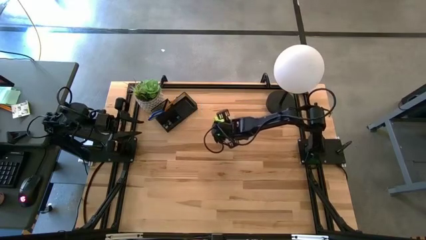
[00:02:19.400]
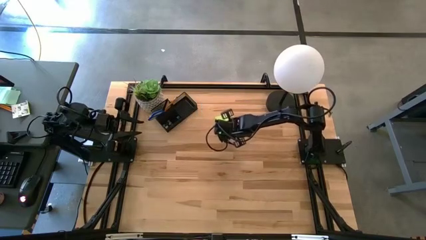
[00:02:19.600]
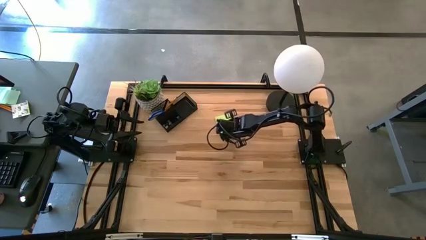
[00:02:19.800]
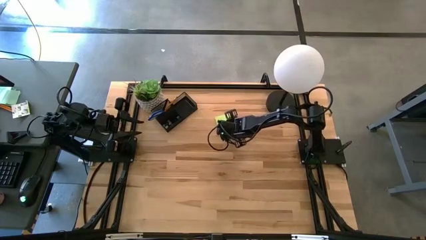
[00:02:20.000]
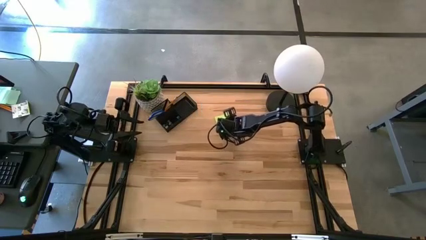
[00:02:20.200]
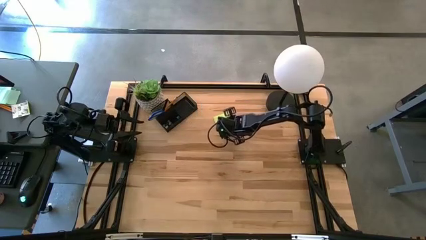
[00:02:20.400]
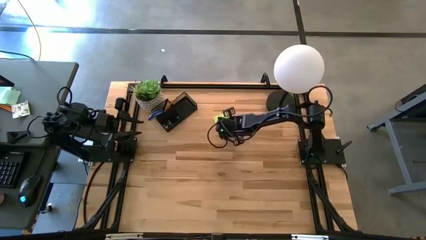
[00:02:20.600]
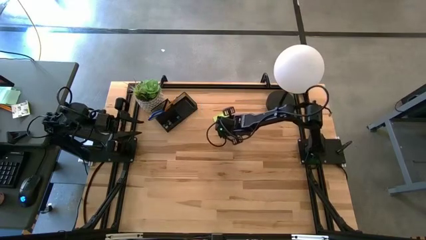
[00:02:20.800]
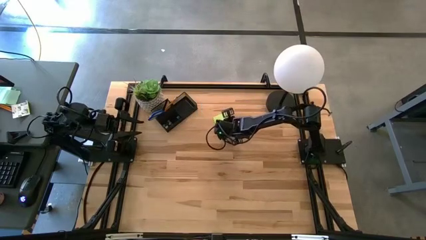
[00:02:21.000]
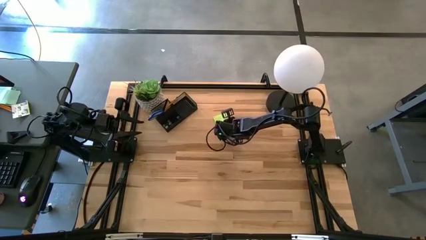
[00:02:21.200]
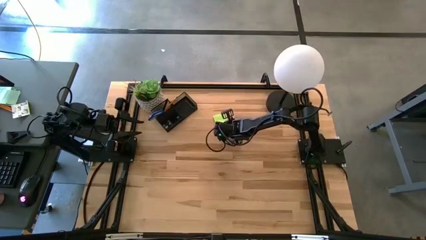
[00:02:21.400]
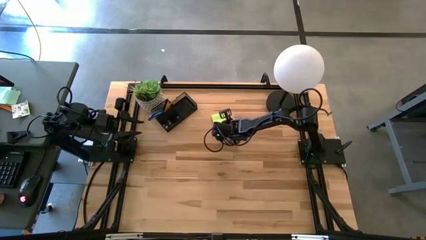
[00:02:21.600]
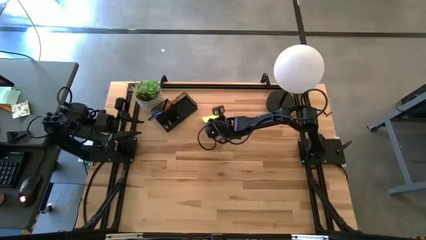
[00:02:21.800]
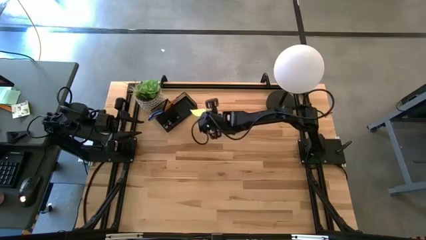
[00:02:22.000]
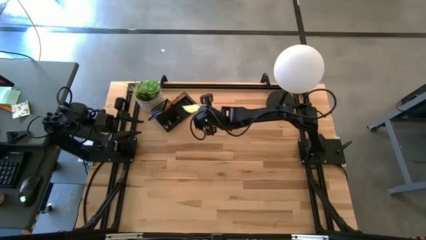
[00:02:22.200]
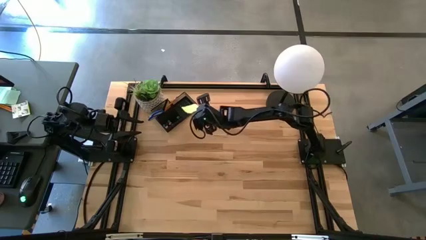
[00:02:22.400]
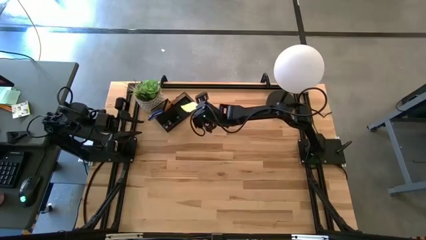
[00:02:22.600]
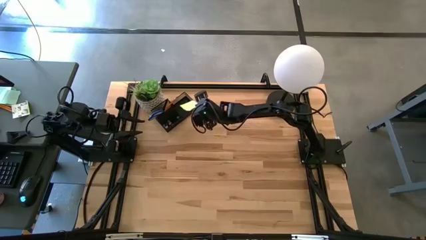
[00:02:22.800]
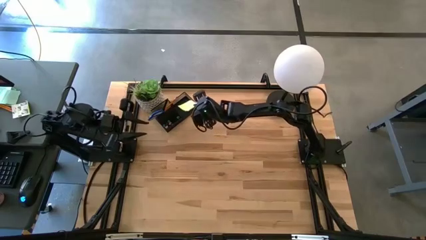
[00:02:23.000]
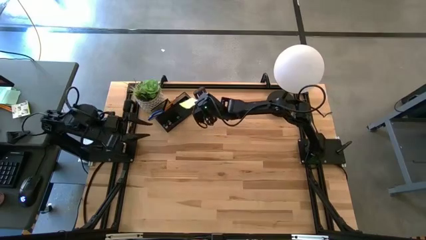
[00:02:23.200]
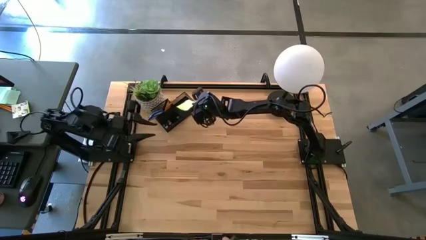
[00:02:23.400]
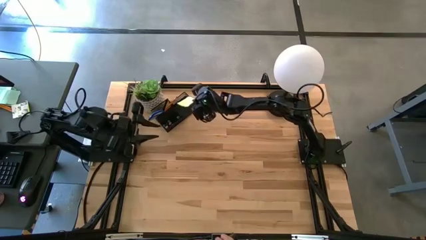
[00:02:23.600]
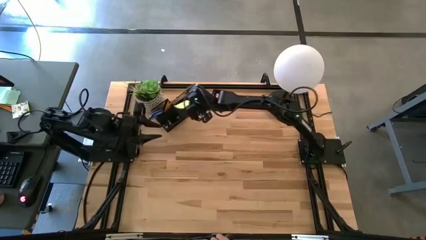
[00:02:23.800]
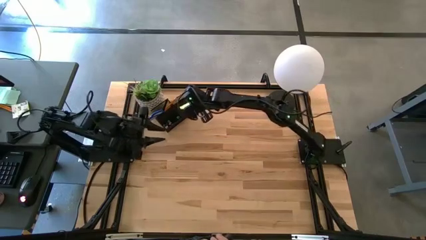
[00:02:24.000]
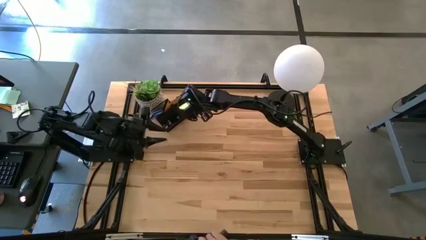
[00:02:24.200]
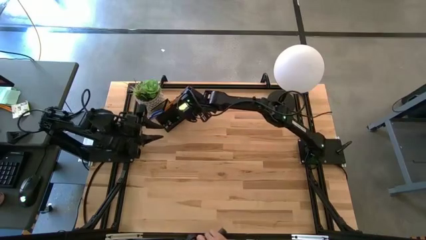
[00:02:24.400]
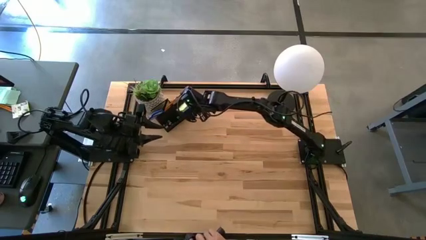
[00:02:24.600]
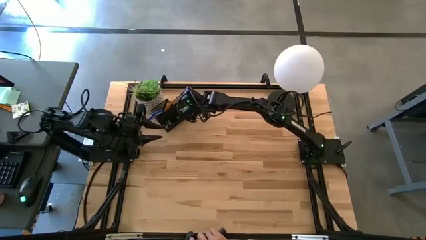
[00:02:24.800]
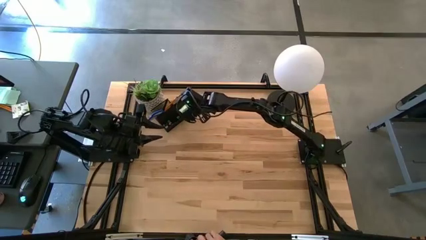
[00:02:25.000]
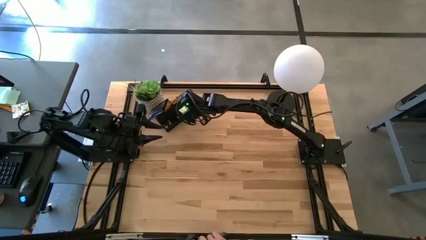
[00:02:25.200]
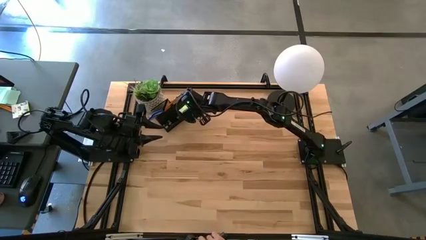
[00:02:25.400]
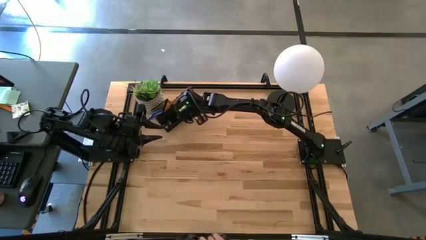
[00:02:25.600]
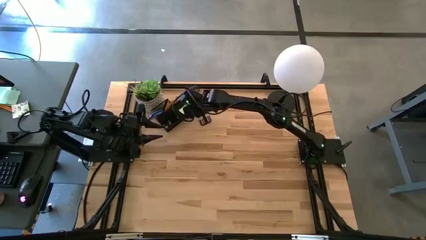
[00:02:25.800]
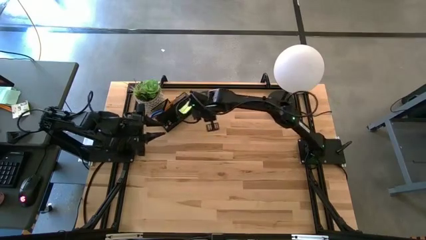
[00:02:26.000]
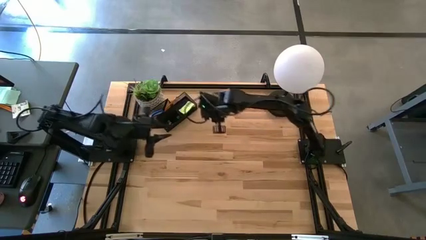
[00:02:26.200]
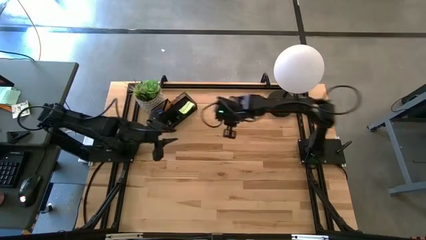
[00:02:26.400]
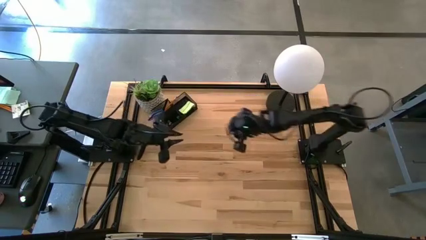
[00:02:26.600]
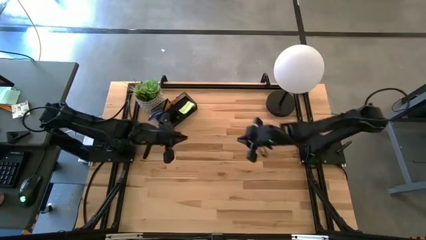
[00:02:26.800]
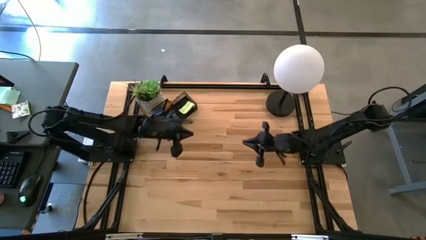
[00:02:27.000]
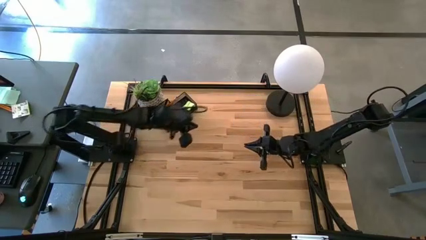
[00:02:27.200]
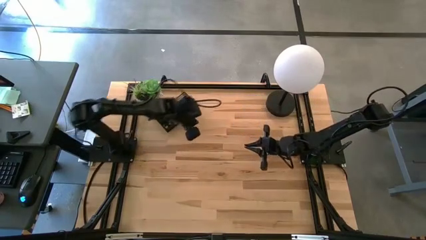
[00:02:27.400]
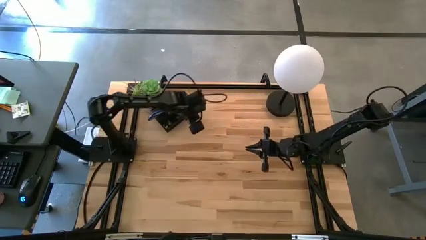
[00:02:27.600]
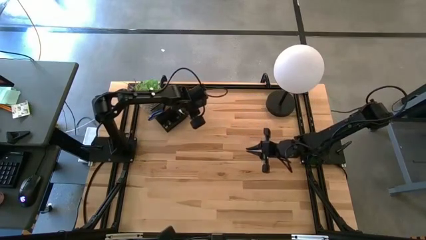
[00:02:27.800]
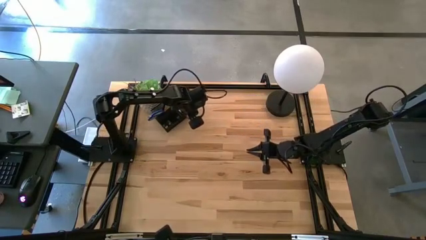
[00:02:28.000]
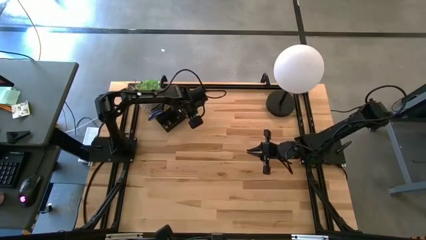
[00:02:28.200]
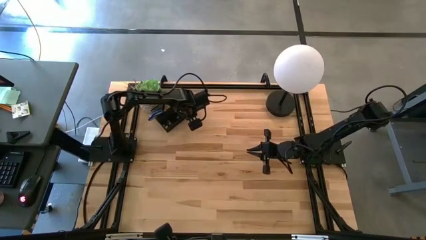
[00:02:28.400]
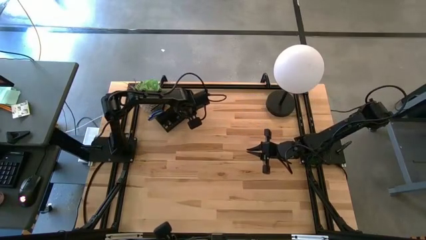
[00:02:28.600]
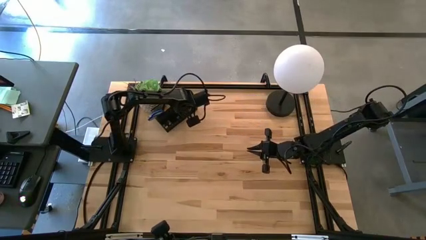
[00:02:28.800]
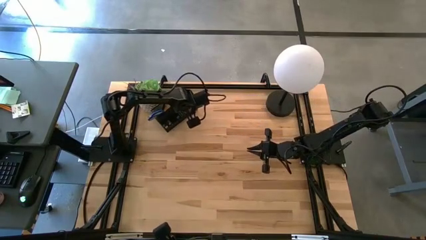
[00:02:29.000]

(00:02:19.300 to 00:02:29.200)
Task: Pick and place office supplies into organizer
Put the green sticky note into the desk organizer

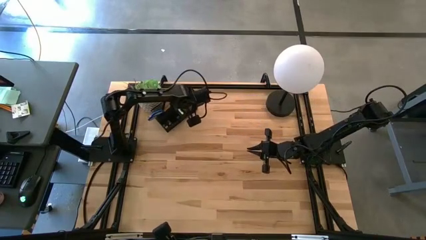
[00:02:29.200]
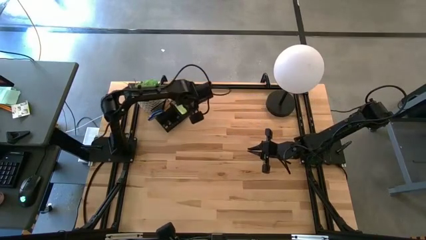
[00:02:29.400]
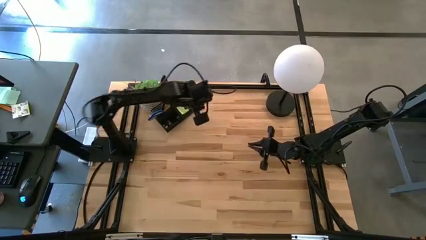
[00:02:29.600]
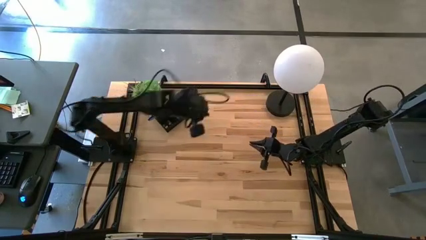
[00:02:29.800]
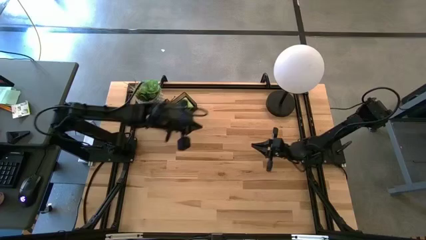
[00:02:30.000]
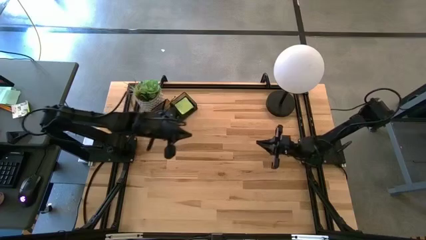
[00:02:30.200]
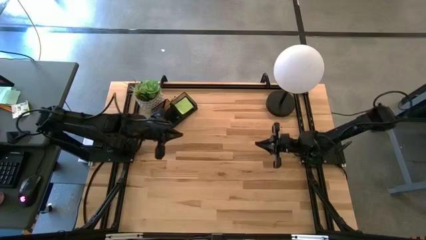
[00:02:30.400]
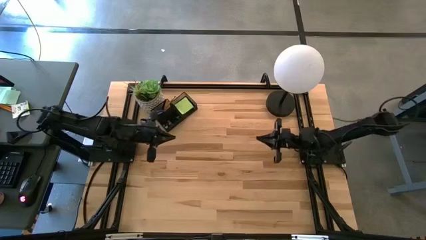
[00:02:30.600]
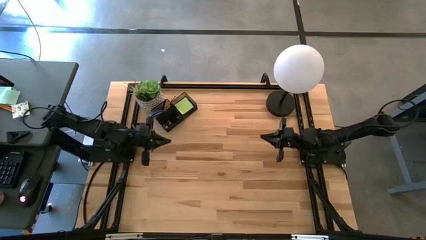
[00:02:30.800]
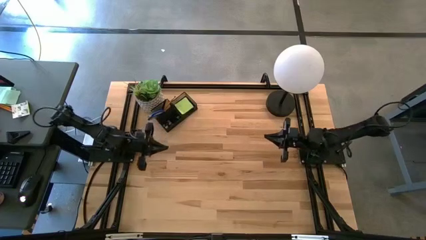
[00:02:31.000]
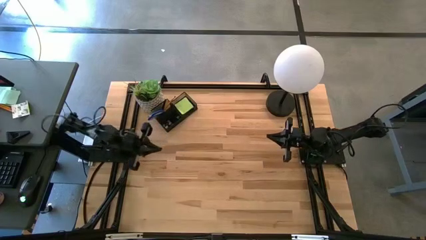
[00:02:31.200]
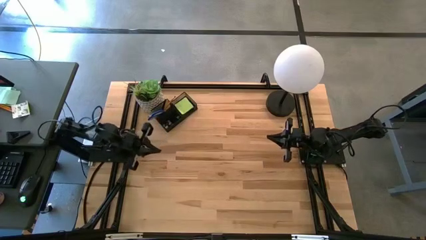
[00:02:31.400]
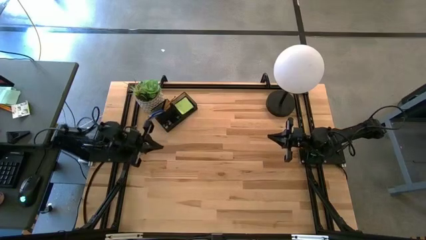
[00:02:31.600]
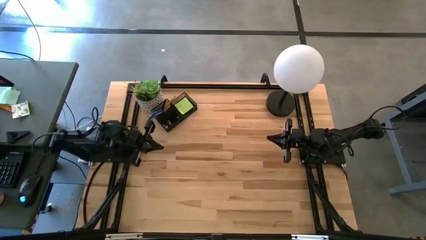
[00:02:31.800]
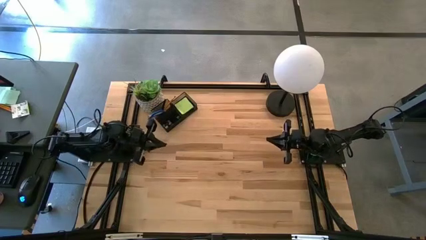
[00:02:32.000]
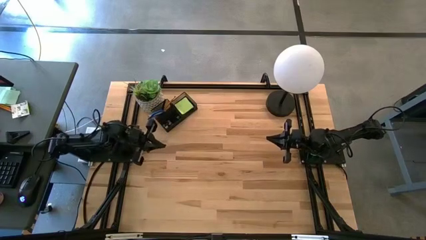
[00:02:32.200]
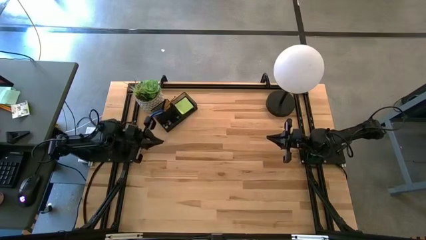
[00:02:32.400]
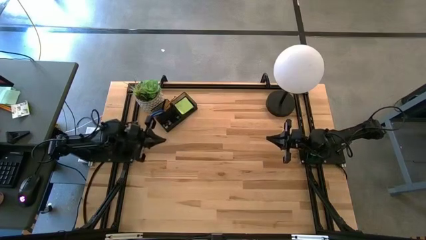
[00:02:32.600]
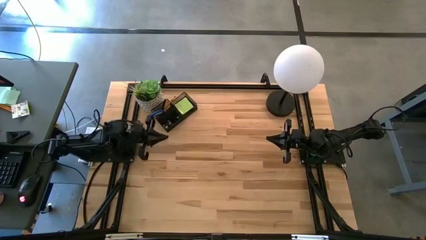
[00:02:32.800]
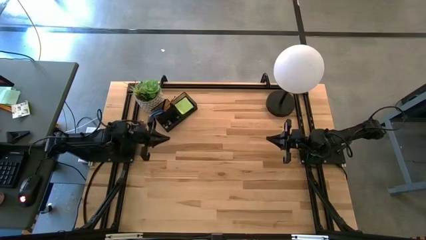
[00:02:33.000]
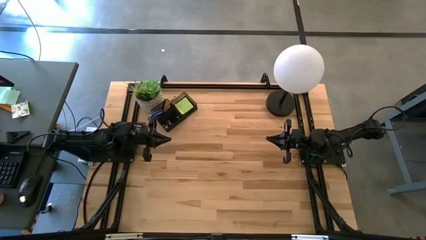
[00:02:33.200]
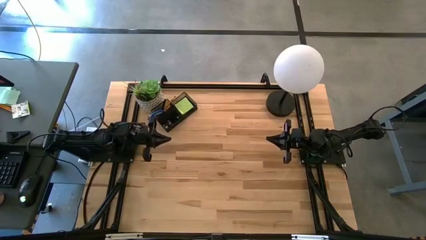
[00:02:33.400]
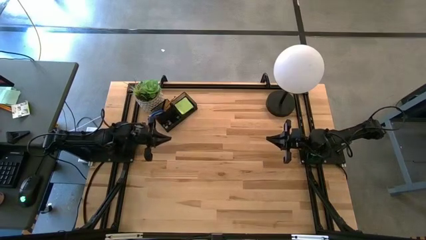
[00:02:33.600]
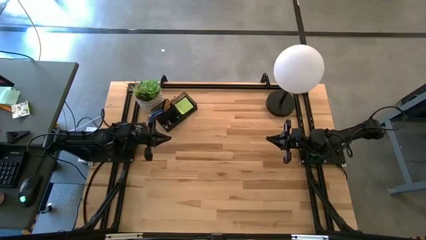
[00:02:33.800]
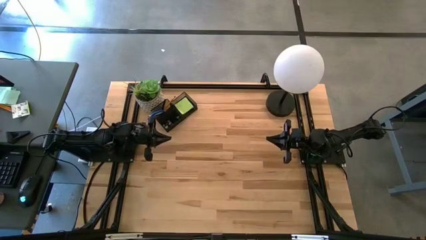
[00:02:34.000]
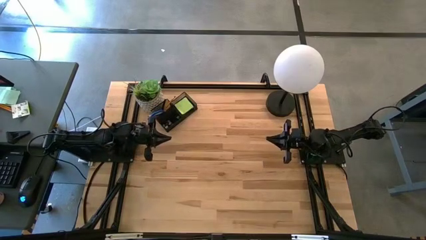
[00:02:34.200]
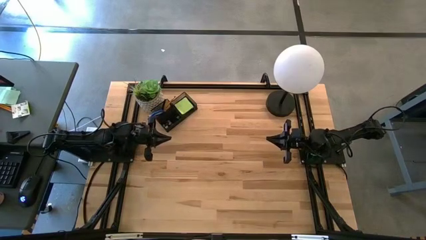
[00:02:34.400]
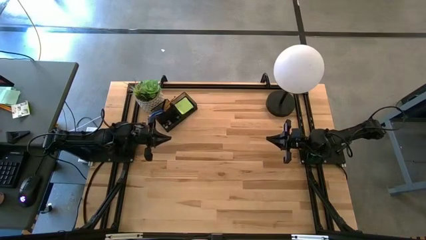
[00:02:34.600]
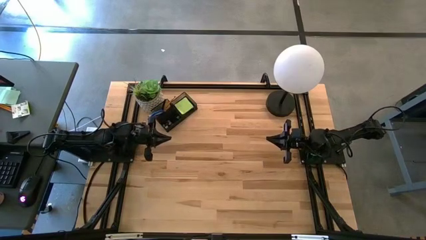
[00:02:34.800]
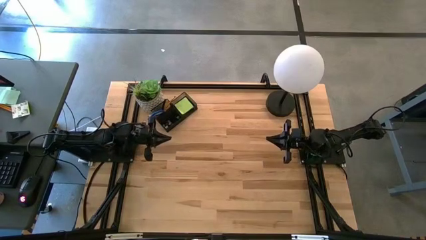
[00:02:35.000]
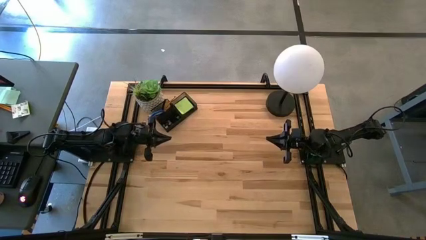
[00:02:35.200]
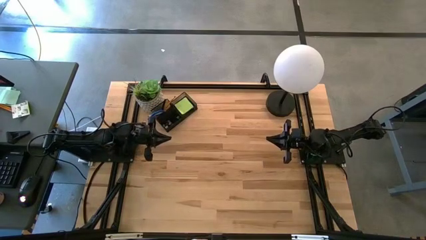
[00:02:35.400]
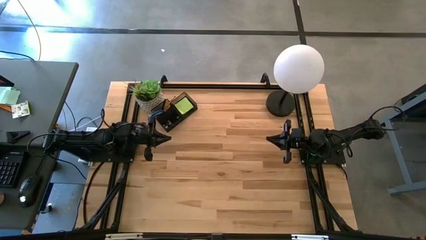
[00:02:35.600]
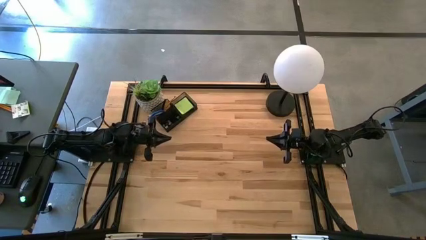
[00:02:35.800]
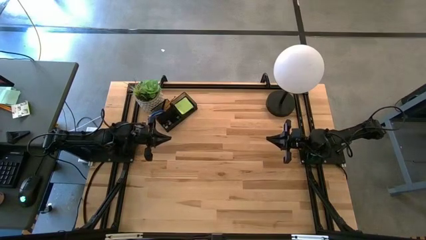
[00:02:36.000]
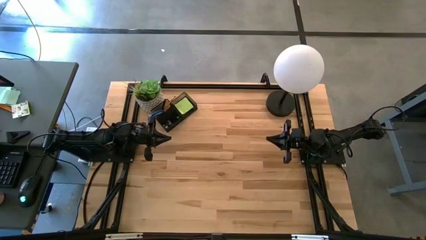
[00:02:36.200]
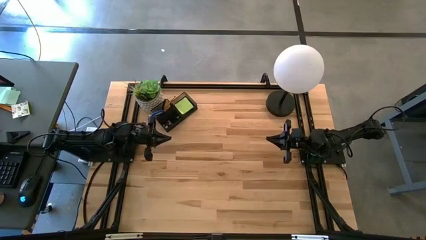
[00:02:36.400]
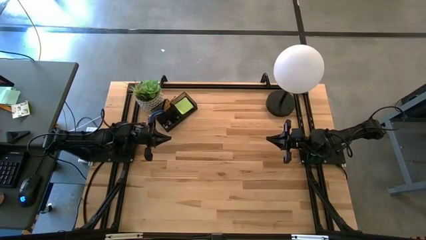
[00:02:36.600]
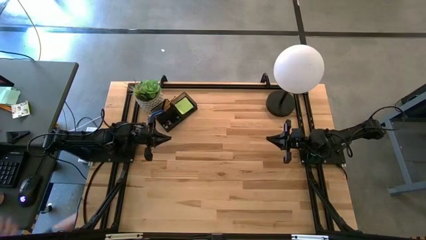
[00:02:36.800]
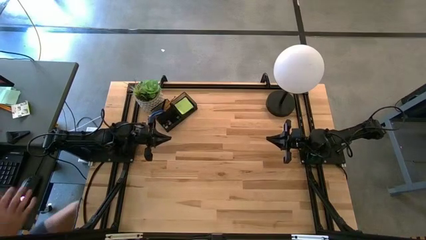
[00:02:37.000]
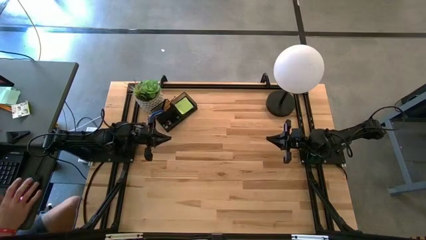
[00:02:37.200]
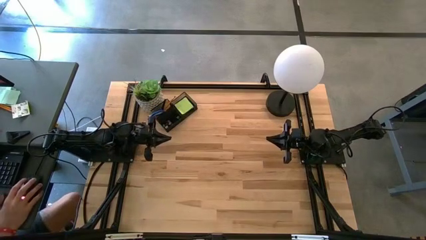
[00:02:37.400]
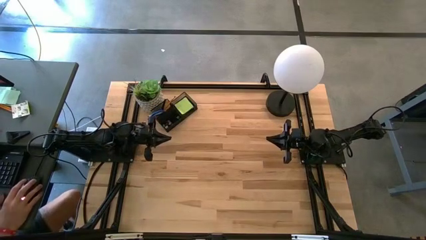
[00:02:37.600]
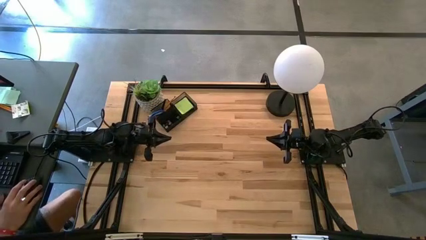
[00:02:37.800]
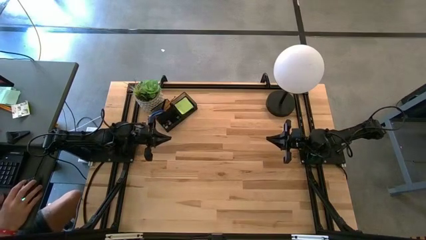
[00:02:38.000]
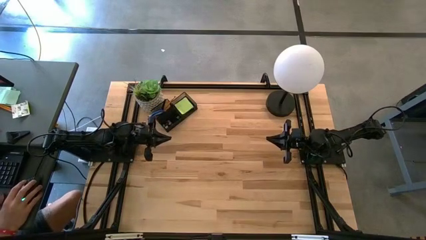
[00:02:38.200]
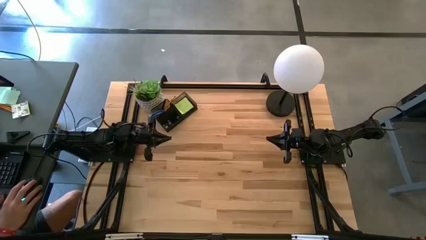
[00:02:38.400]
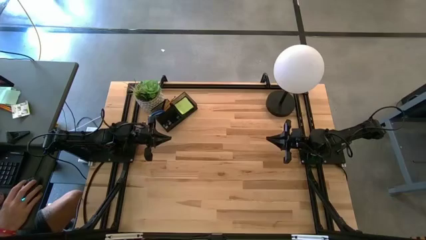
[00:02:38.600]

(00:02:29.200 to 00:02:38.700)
Return to Home Position
